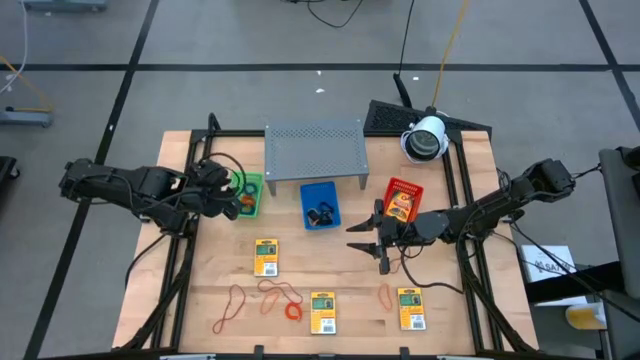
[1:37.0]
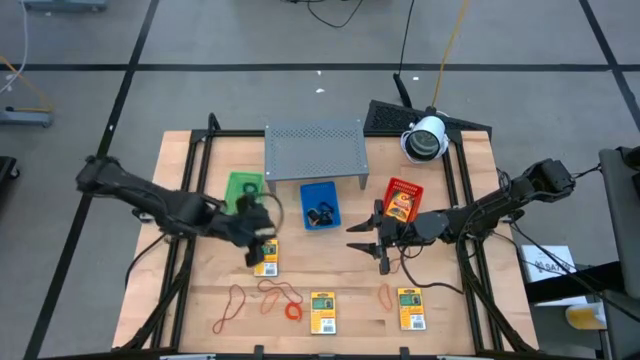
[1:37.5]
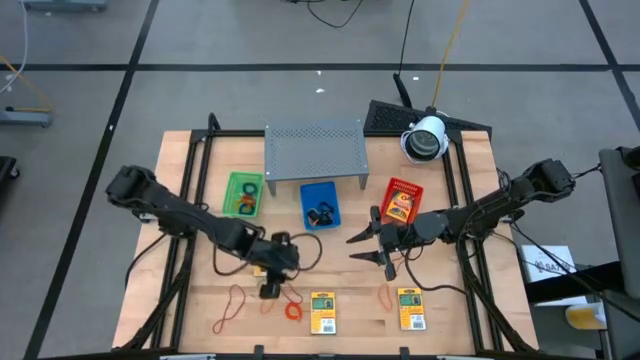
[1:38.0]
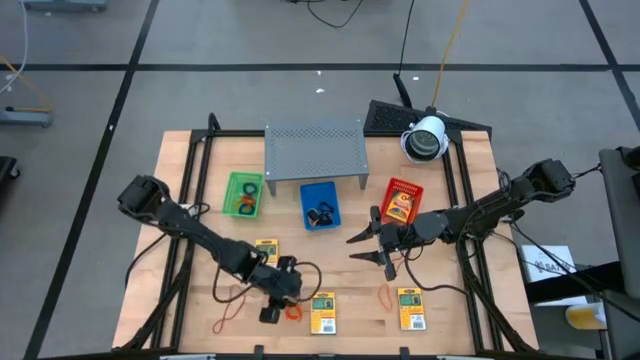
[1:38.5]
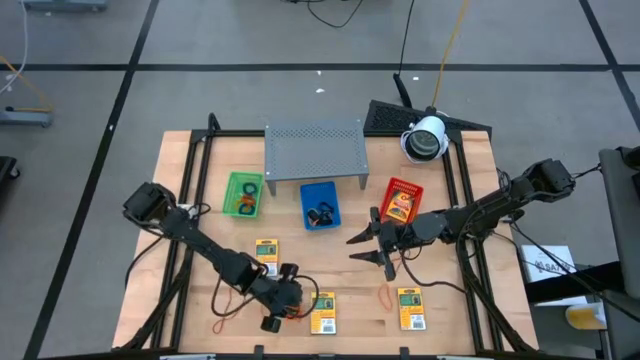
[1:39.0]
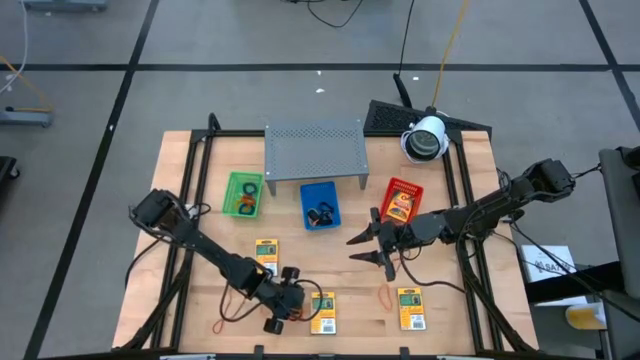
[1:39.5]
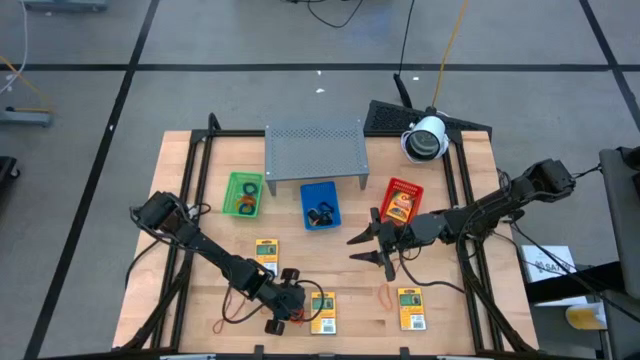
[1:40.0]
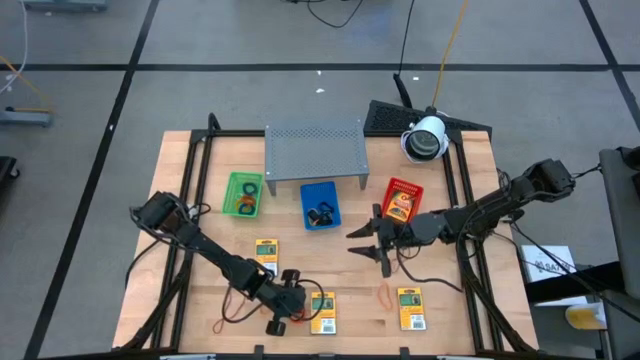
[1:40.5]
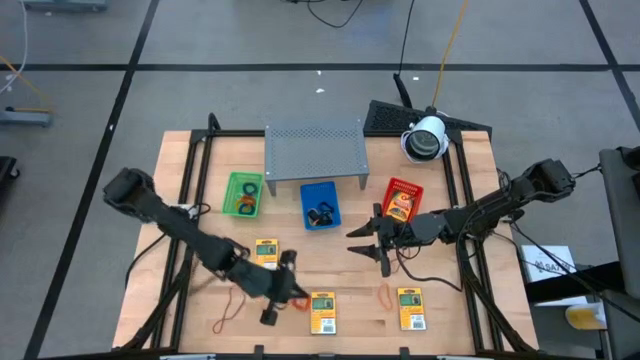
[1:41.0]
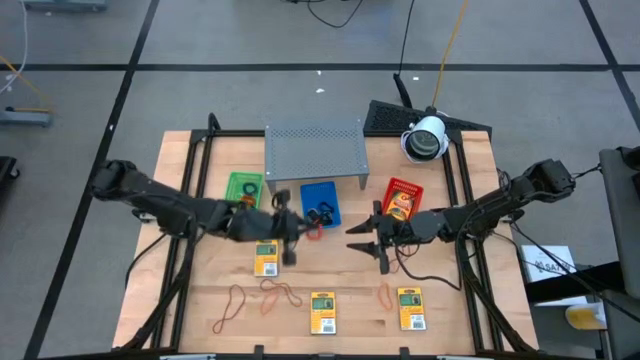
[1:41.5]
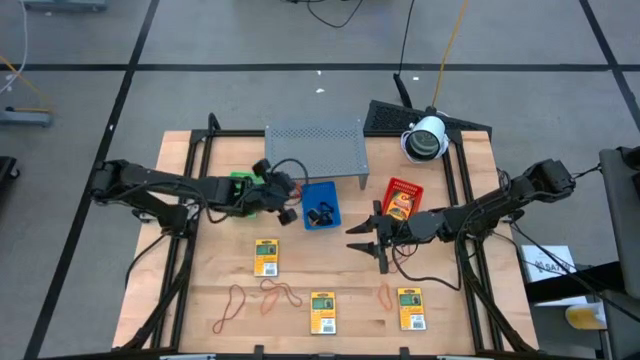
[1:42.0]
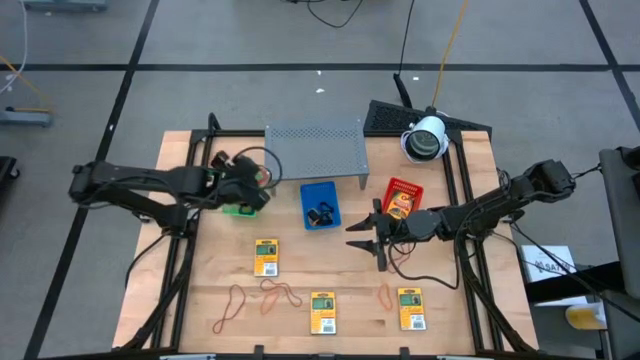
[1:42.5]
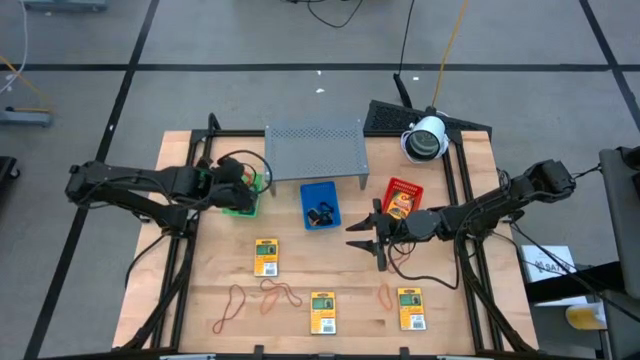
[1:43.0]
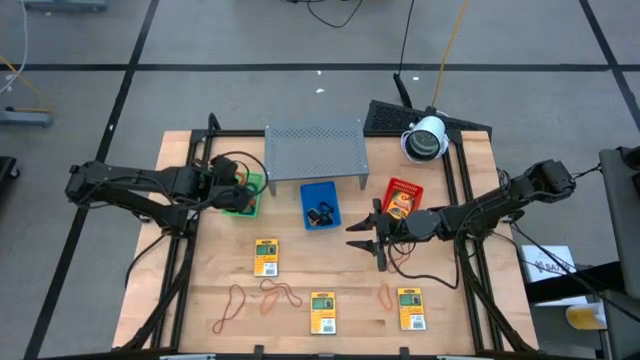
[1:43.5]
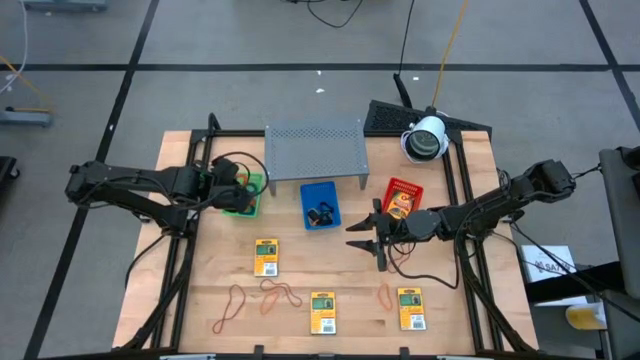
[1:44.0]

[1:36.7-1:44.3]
Task: Pick & Place Office Desk Supplies
Put the orange spring keychain into the green bin

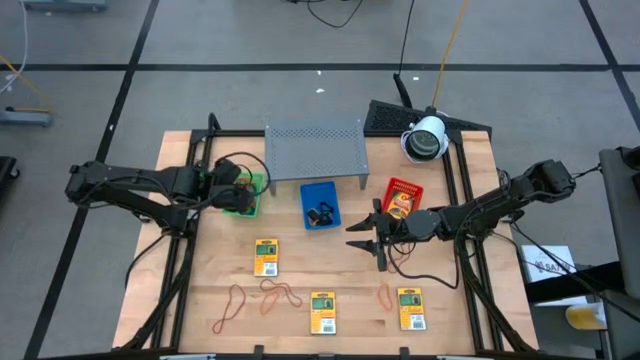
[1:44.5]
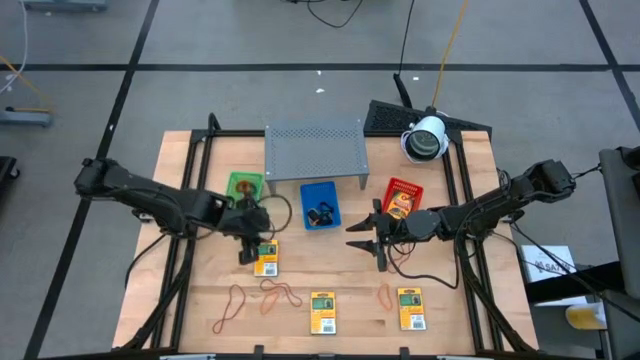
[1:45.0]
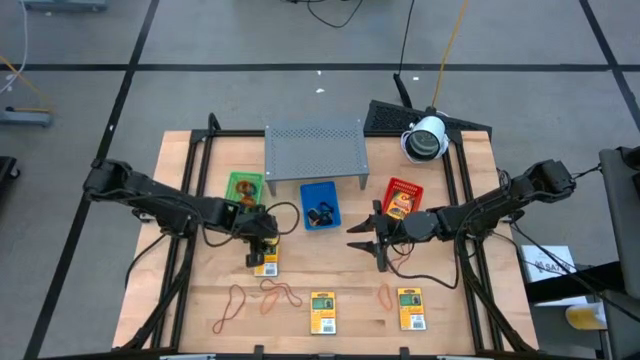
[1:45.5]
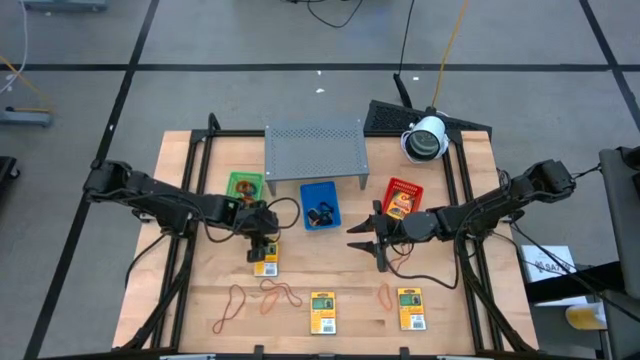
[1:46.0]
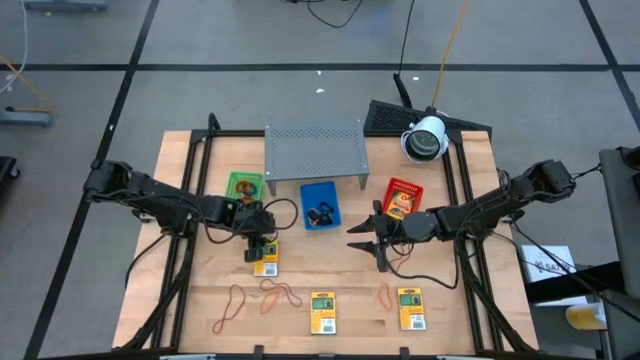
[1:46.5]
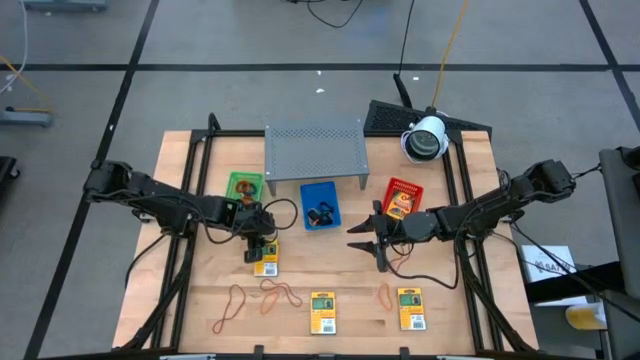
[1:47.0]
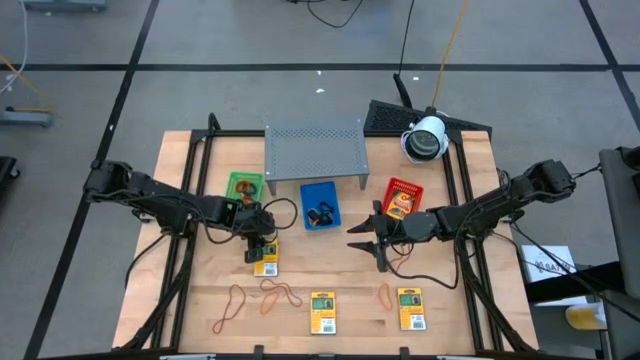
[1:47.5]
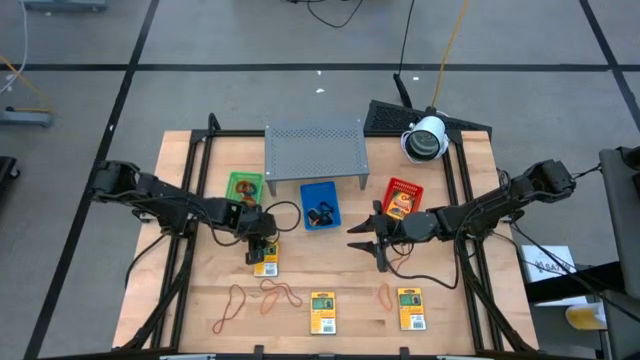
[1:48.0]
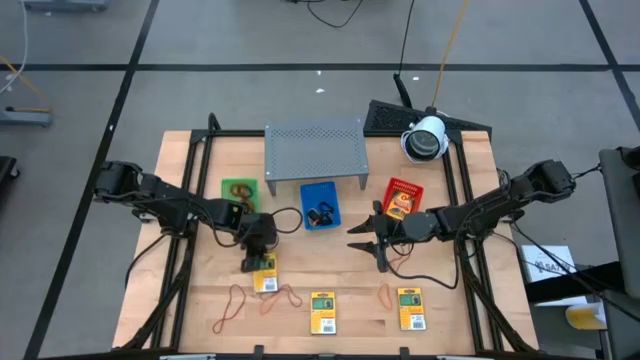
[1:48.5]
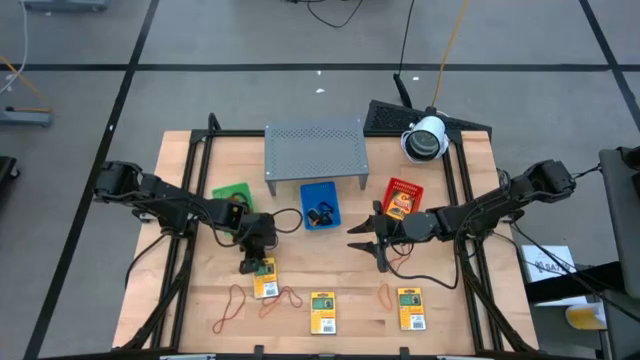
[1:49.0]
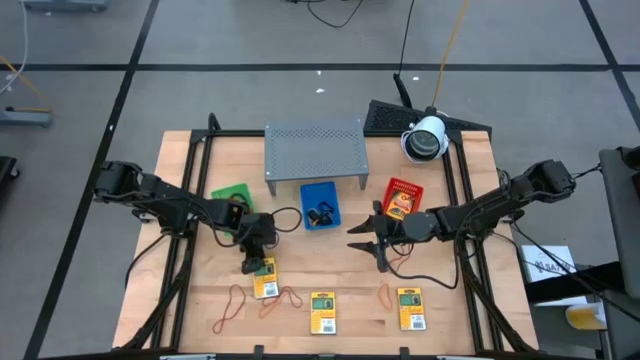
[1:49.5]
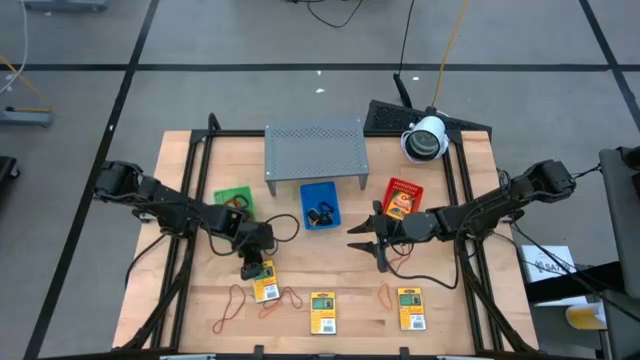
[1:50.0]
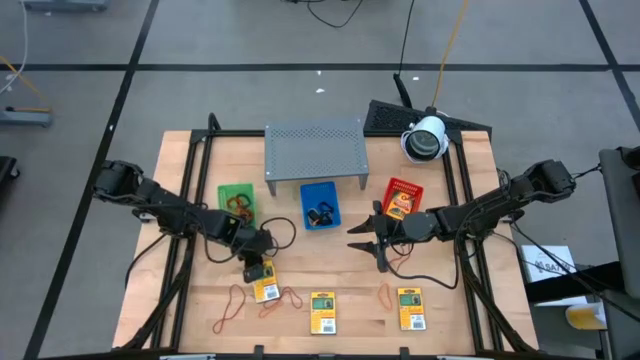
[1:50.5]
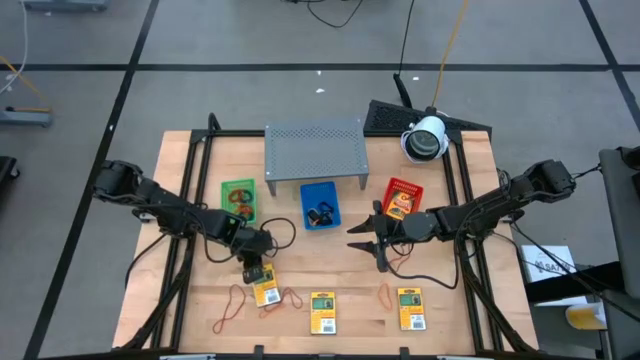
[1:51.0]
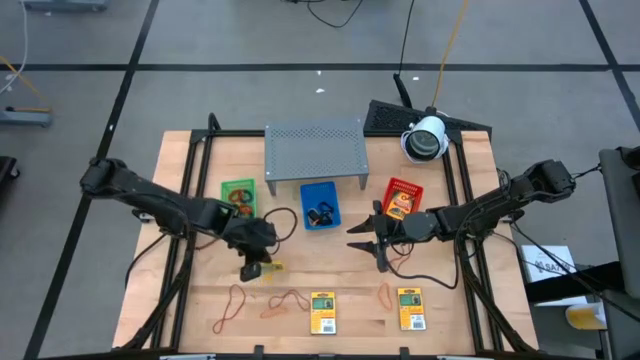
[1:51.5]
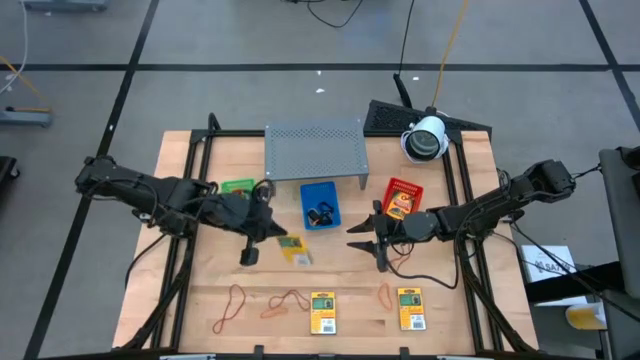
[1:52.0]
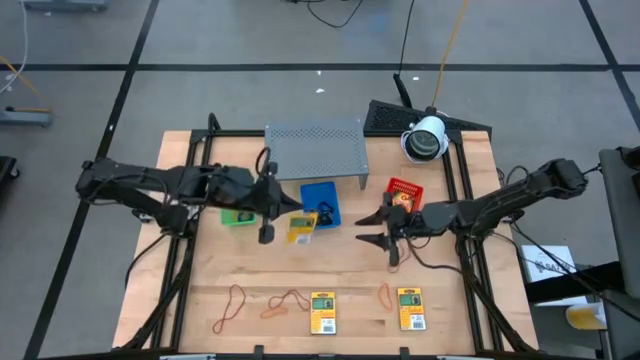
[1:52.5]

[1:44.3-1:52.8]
Put the crayon pack into the orange bin

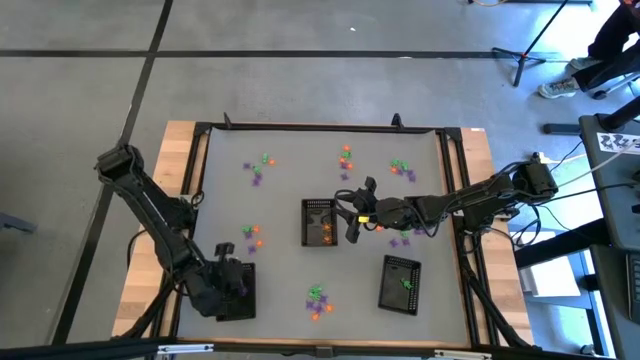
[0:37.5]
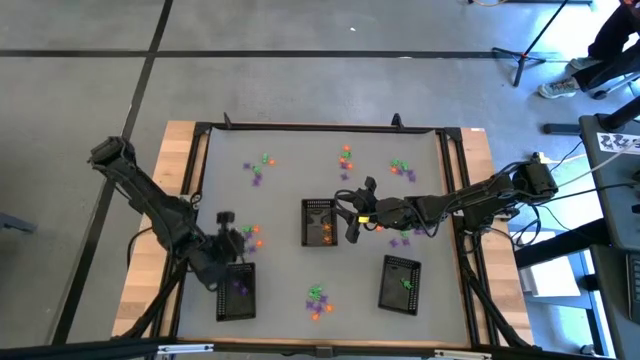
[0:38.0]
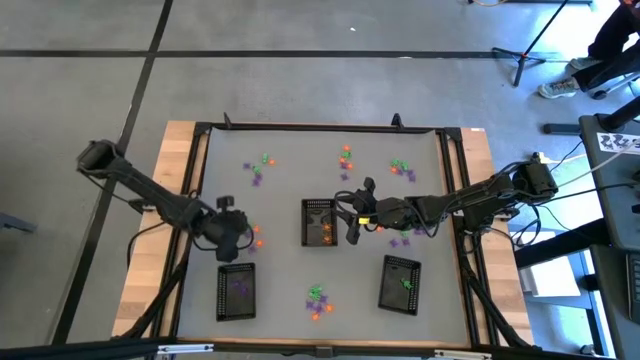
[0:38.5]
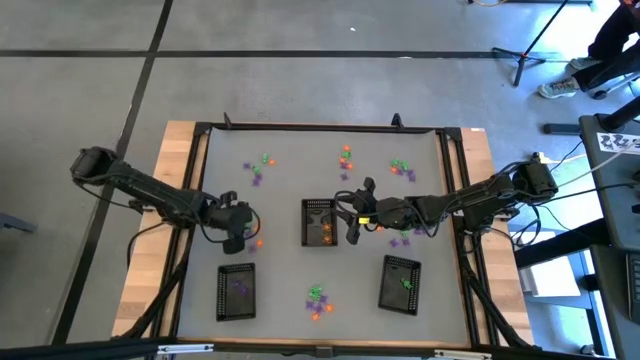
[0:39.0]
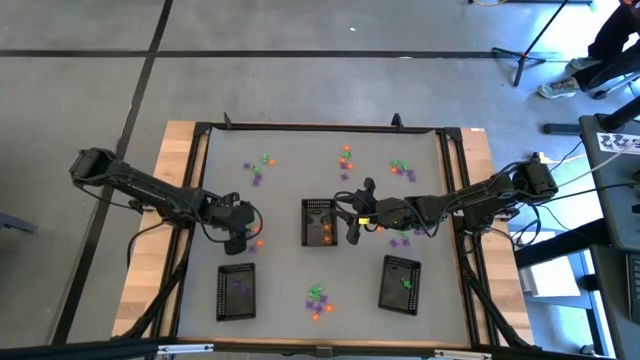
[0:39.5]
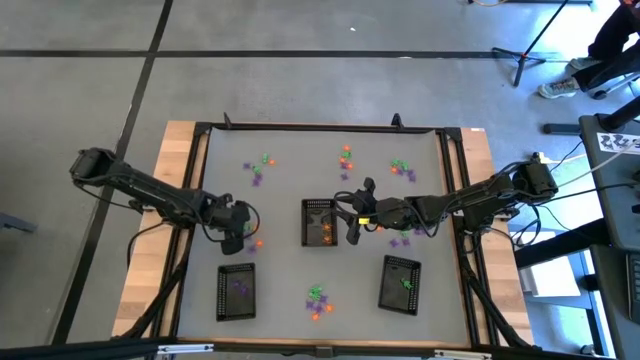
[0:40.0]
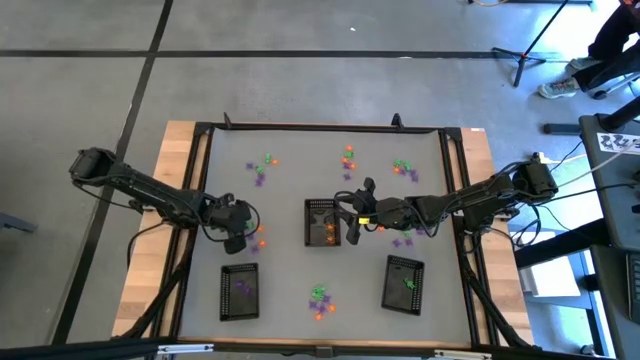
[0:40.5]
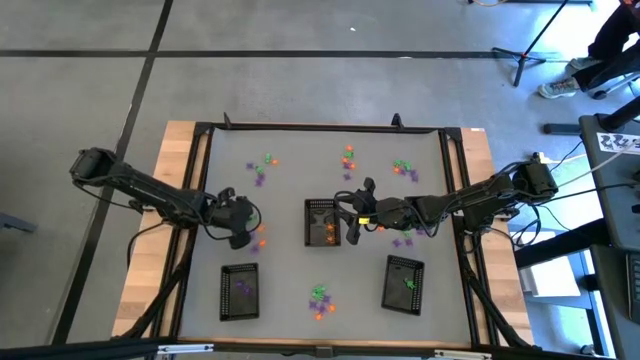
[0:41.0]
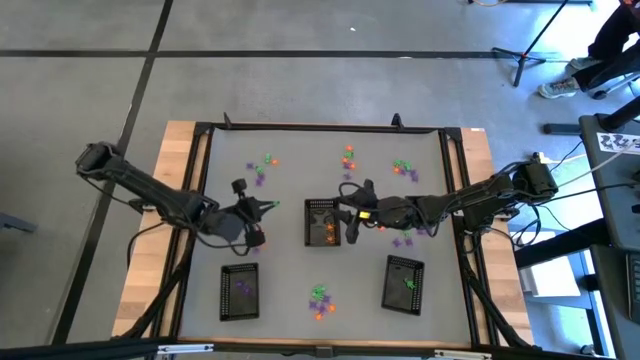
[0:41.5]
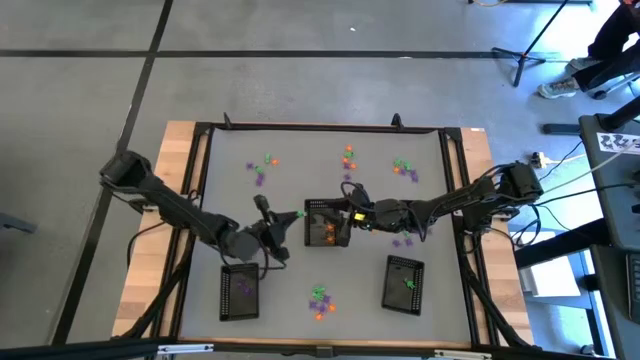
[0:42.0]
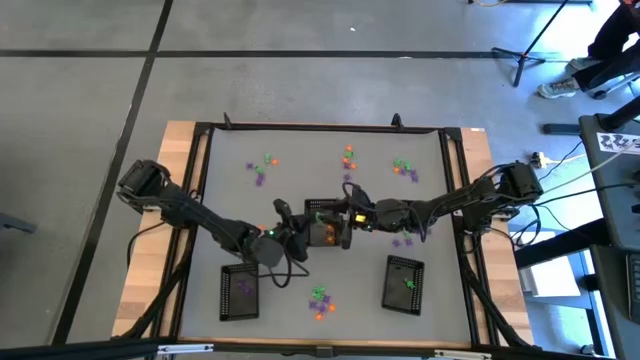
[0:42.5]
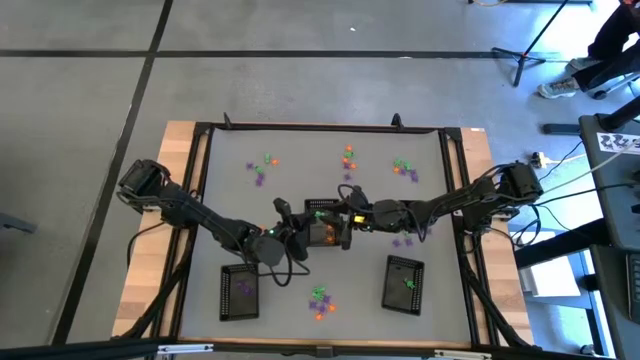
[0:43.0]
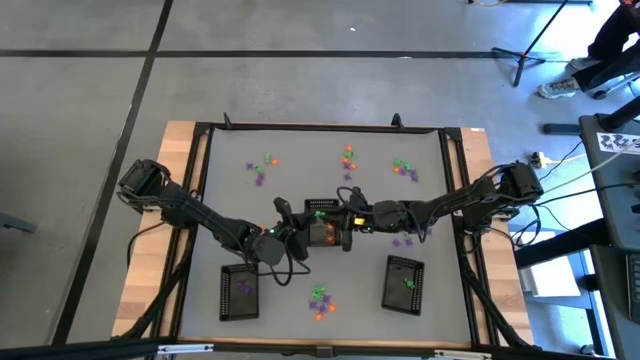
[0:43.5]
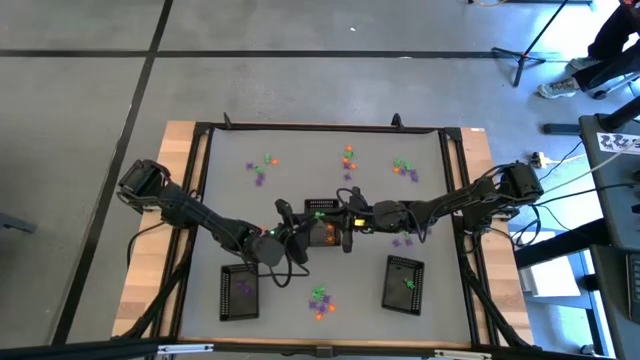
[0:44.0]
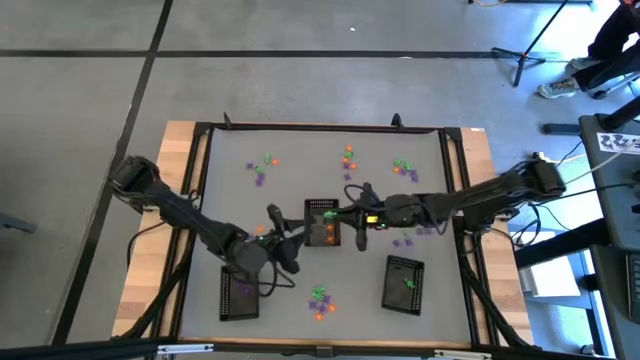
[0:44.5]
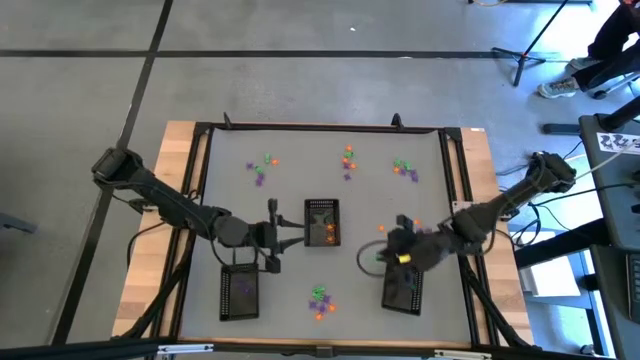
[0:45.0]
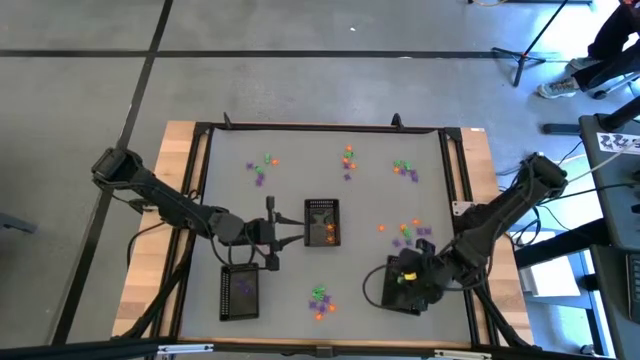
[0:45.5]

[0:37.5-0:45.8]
Task: Sort Halloween decoration
Put the green skeleton toy into the bottom right black bin
